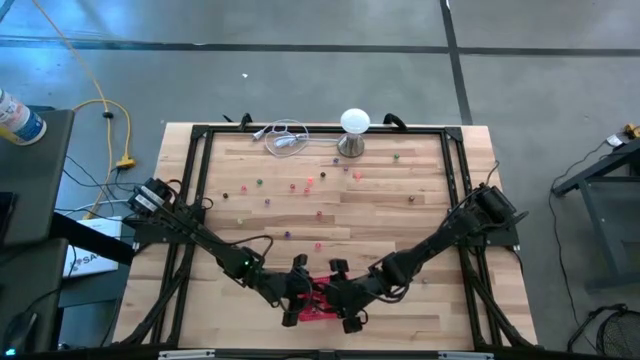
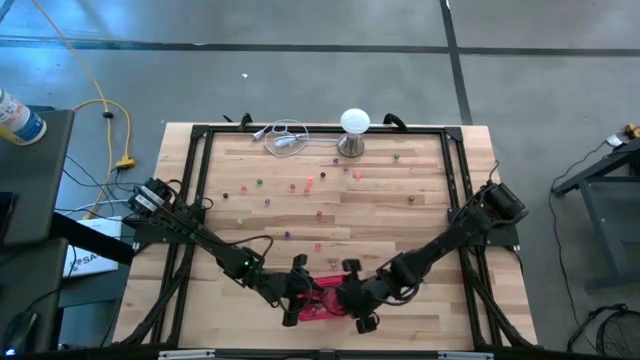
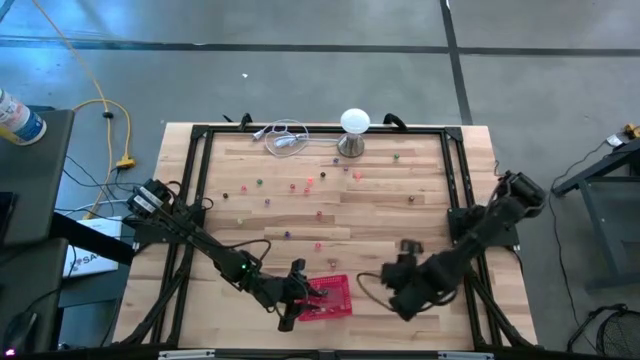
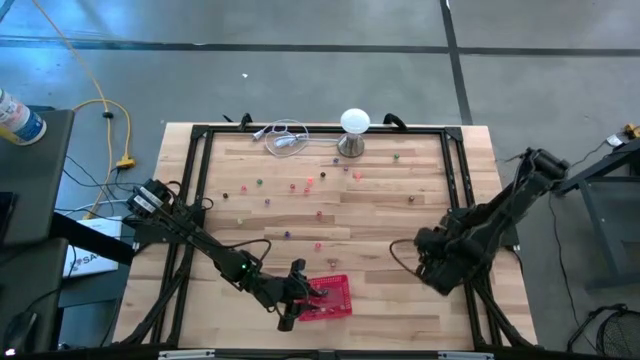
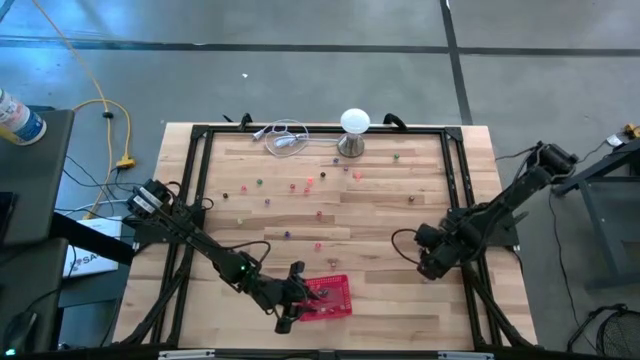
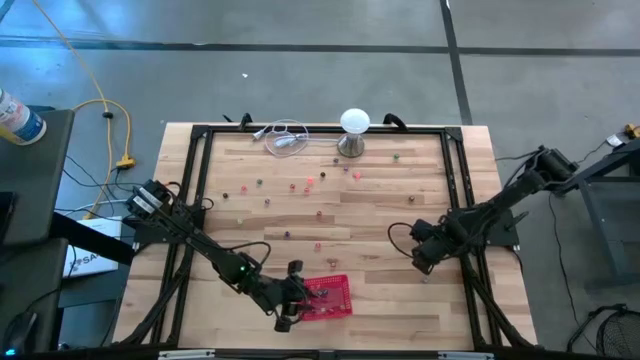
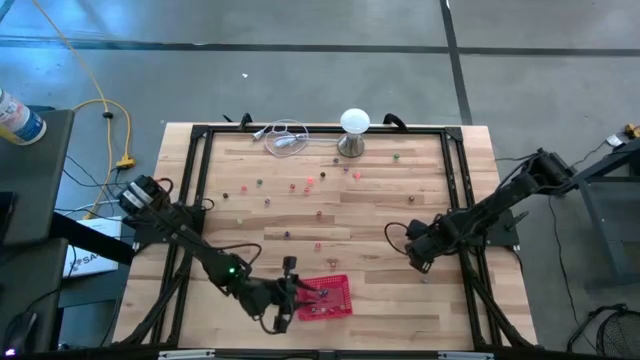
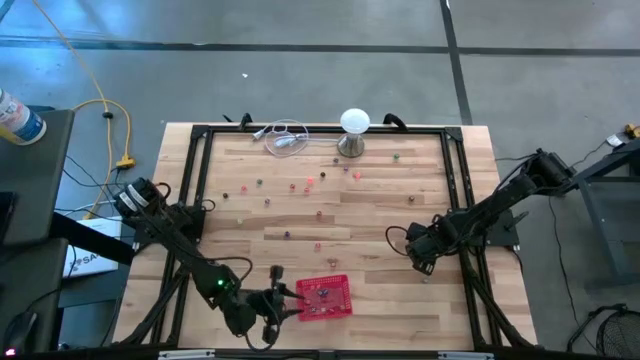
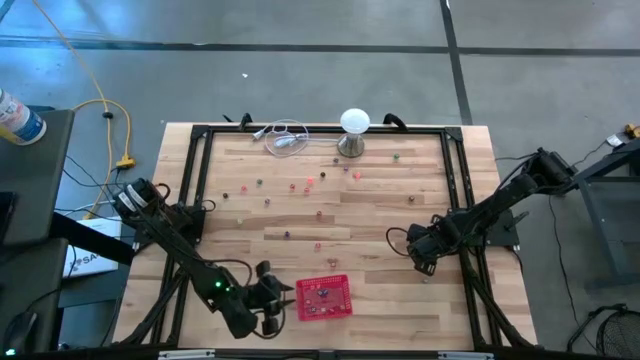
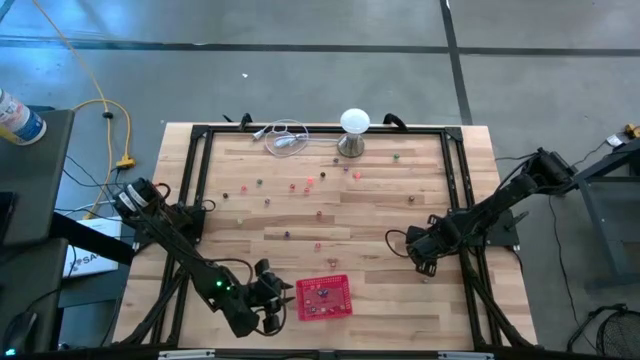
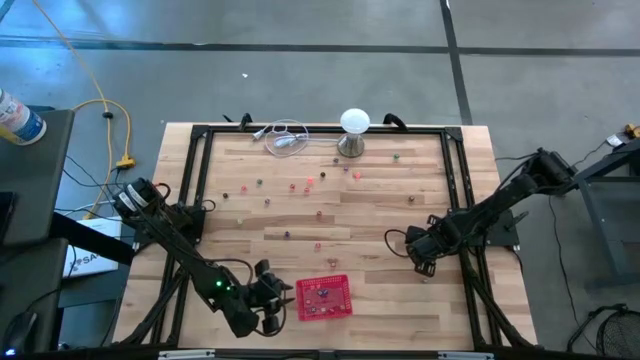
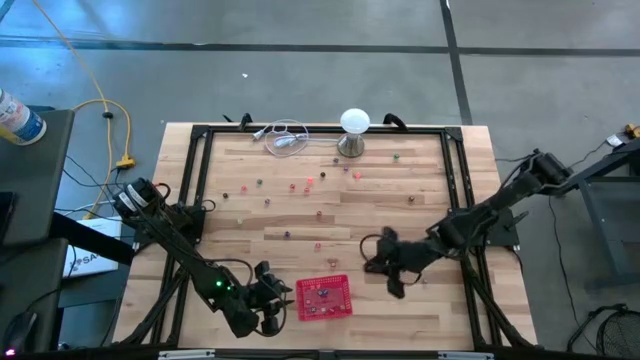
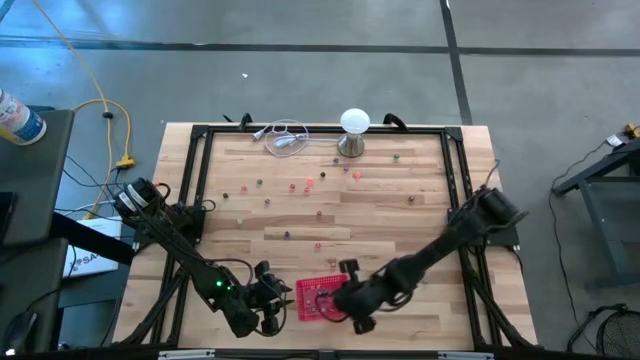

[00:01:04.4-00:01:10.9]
Task: Pick & Place Dice
Put the black dice into the red bin

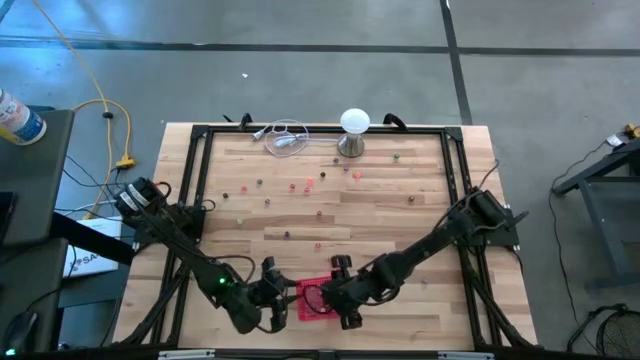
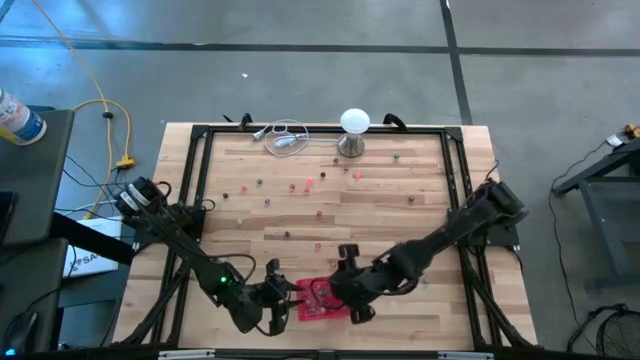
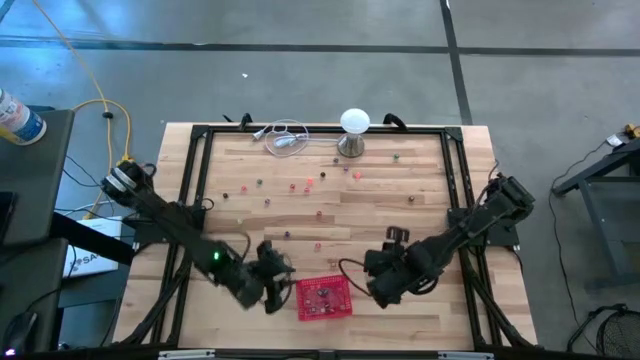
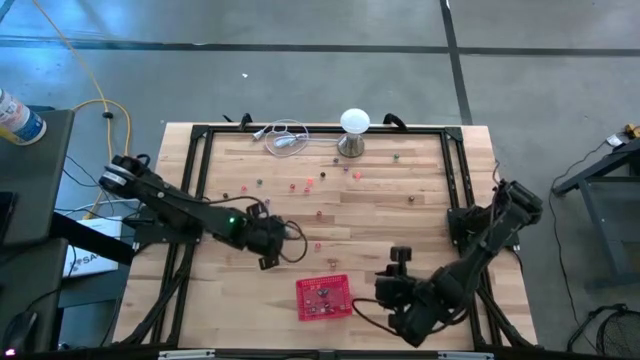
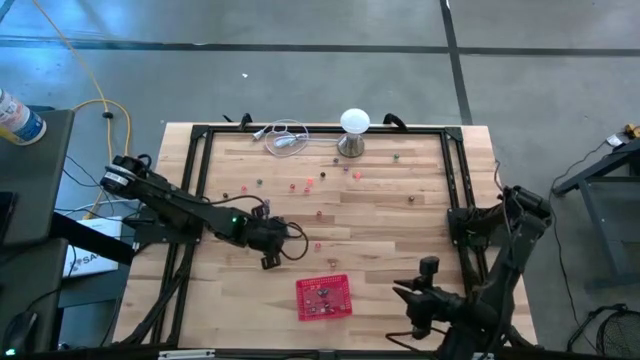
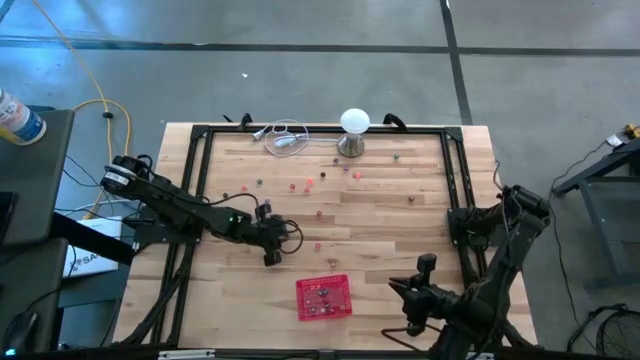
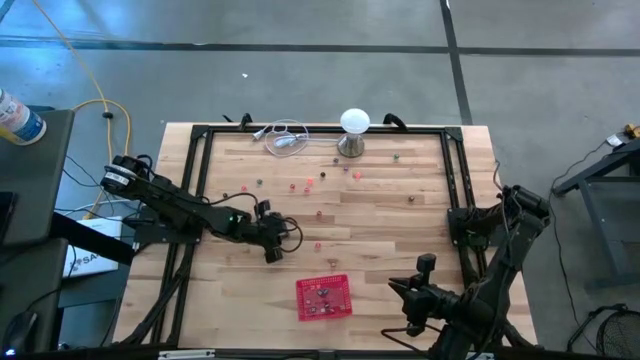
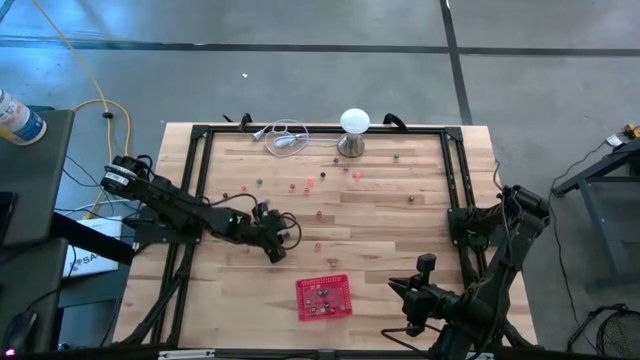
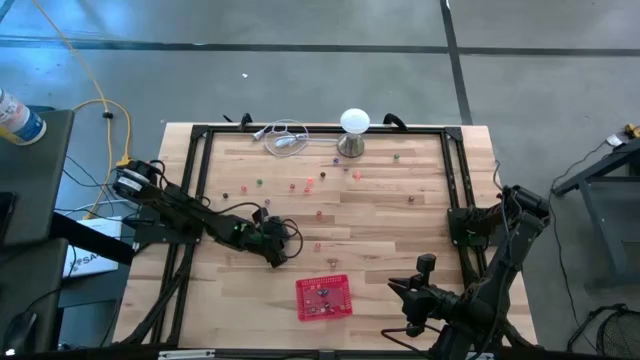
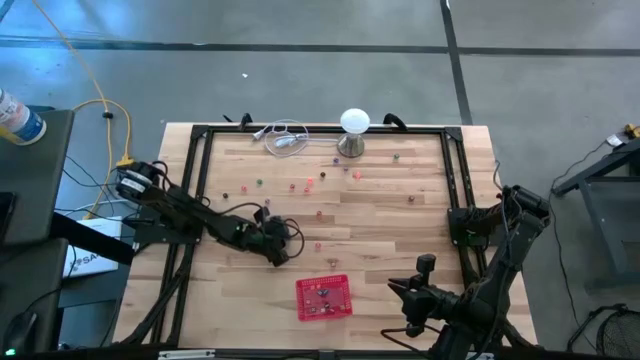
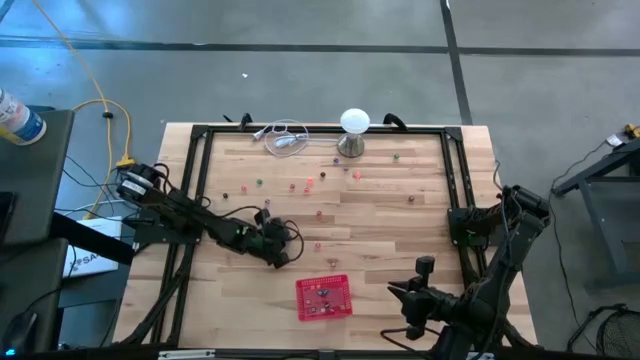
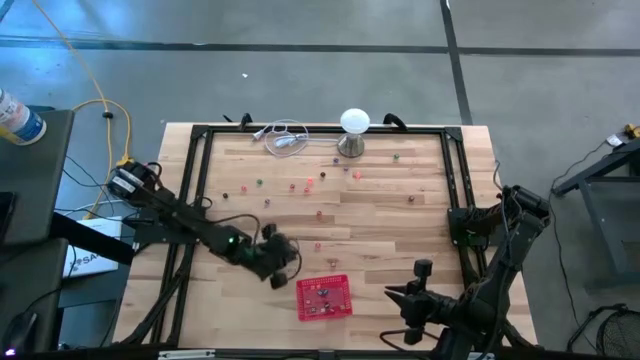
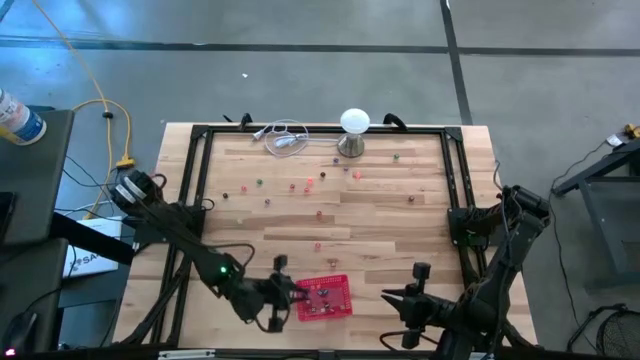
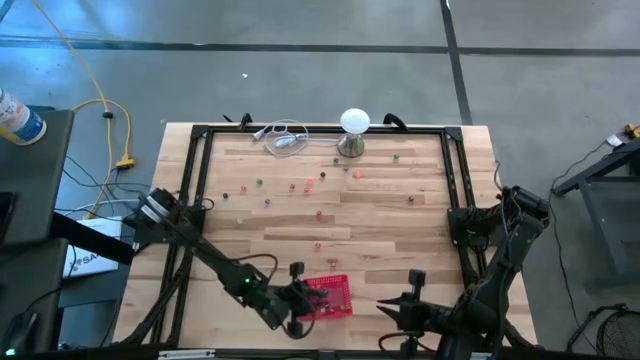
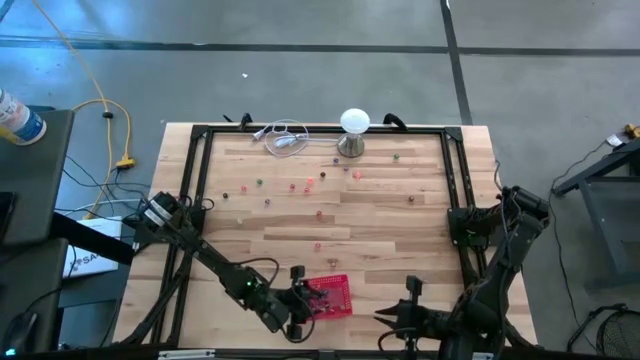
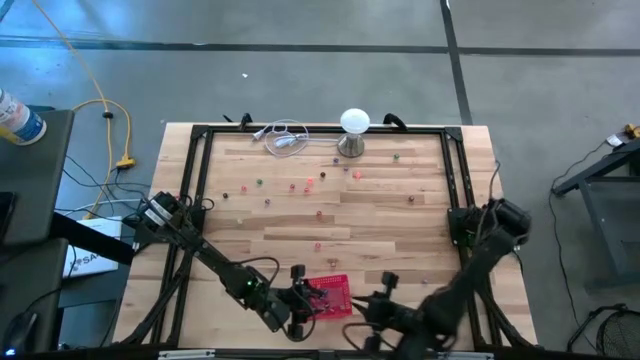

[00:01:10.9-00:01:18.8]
Put the dark blue dice into the red bin

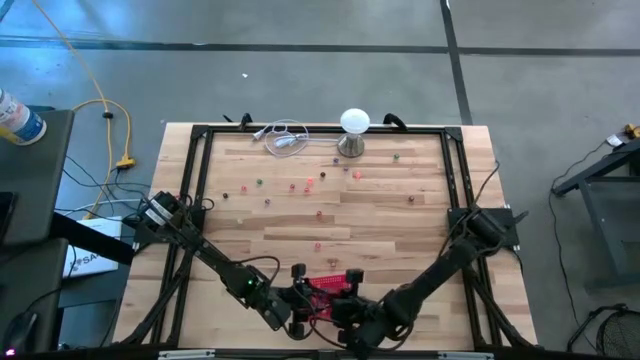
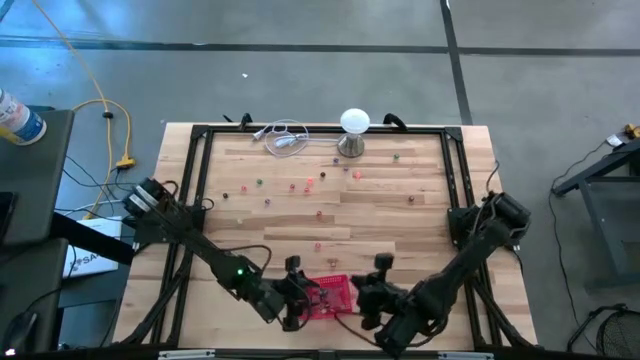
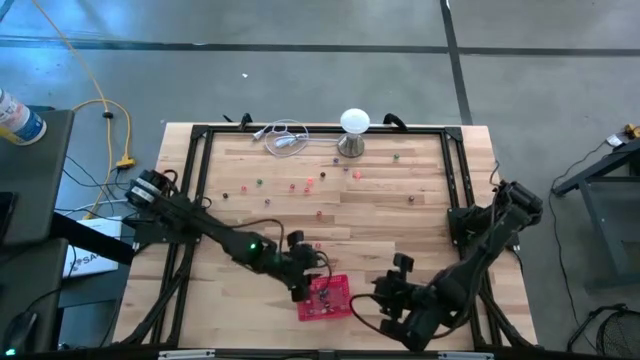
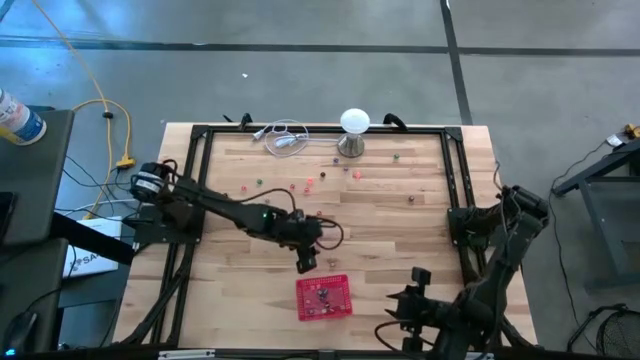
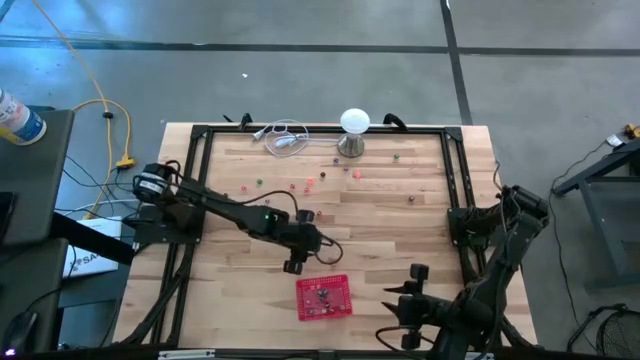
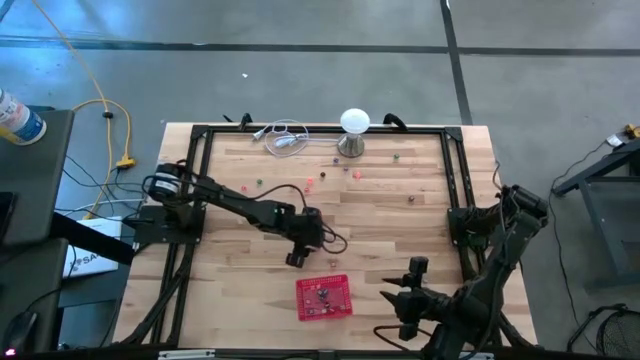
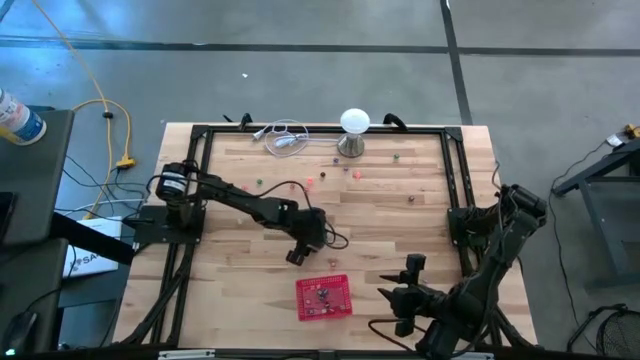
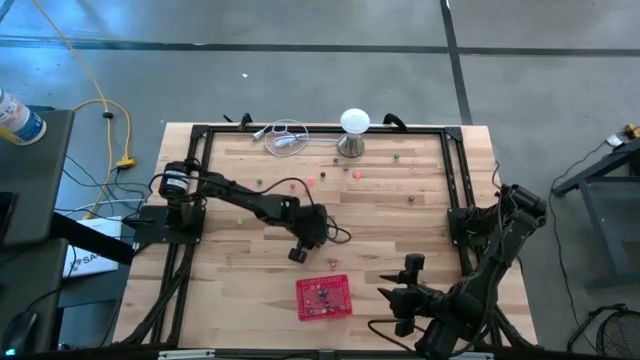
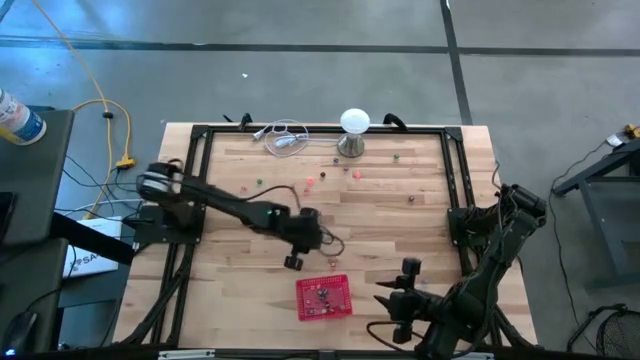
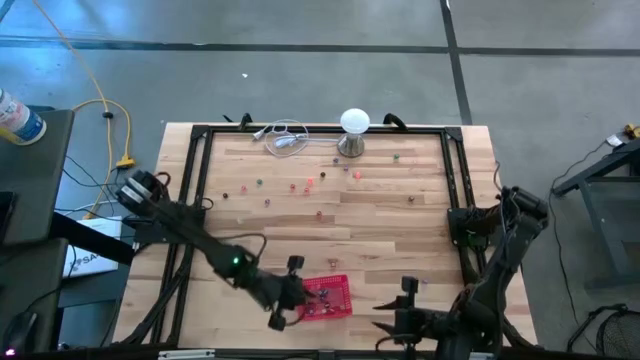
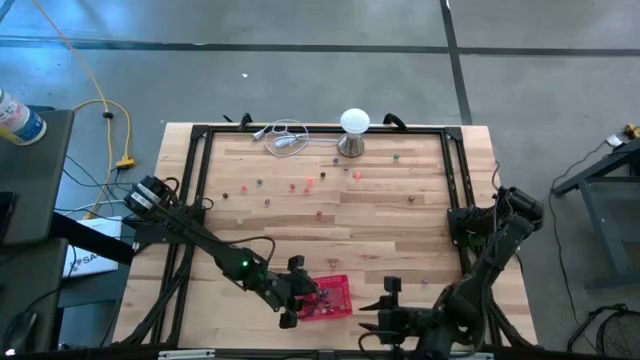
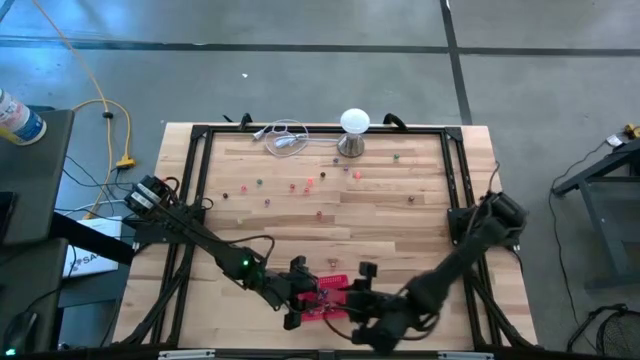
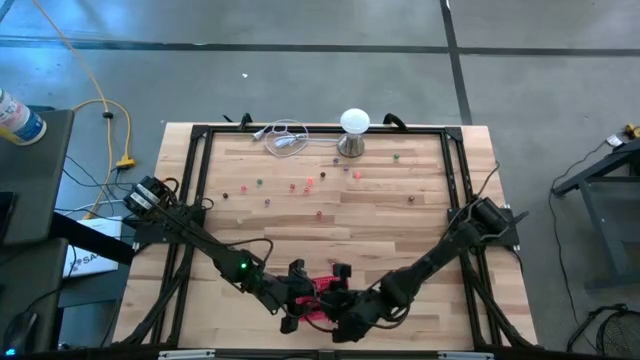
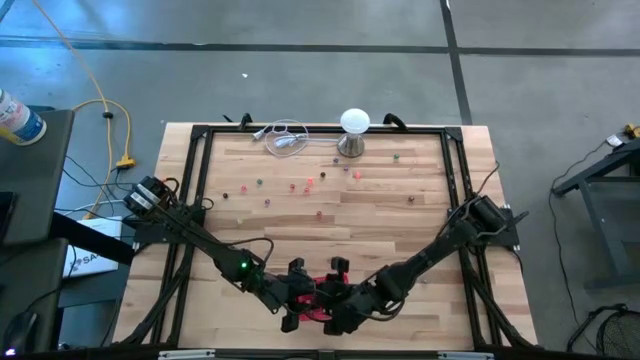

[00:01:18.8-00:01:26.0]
Put the pink dice into the red bin

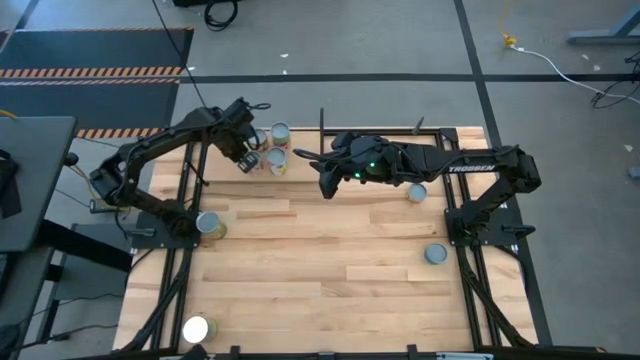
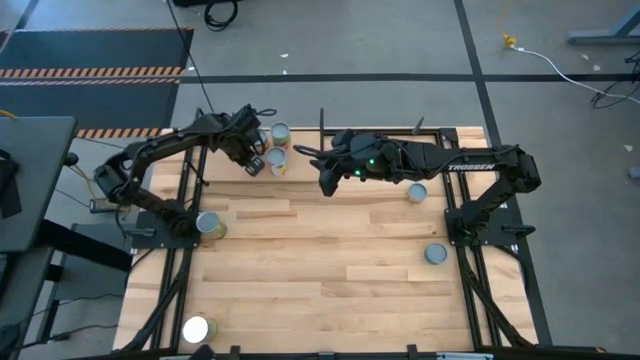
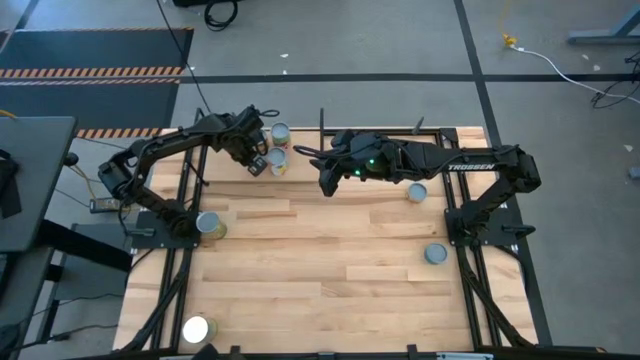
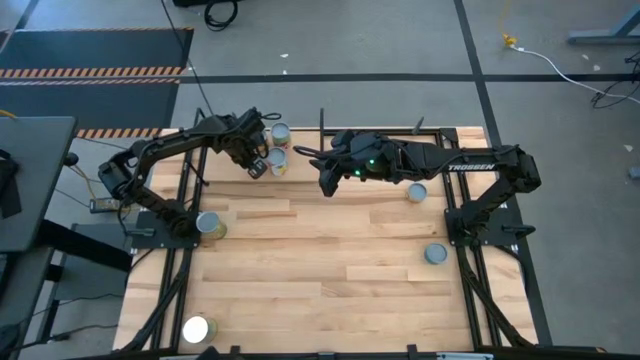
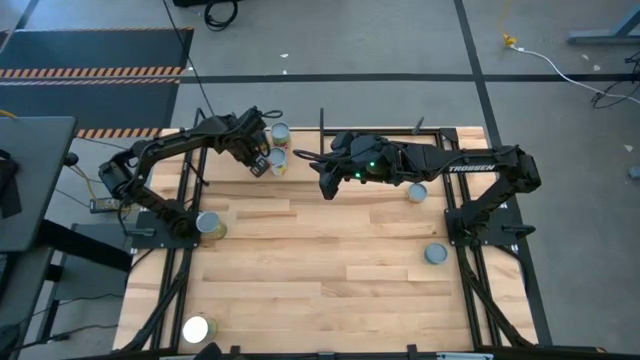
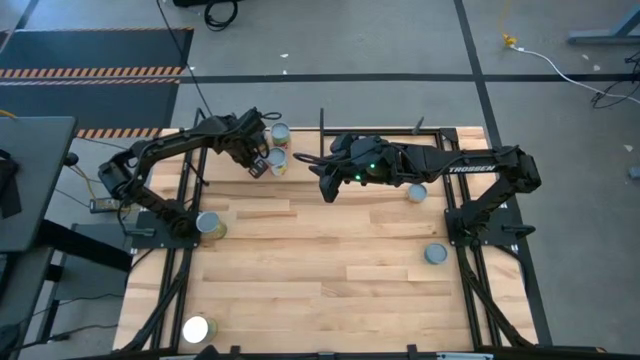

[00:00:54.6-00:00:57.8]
Task: Pick and place cans onto a shelf
Adjust the canned diced tomatoes on the shelf
